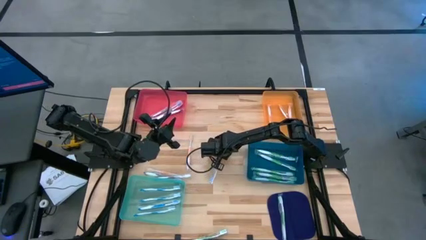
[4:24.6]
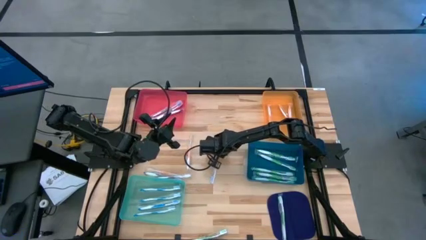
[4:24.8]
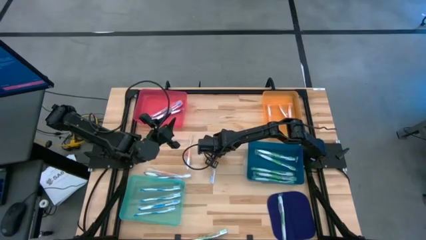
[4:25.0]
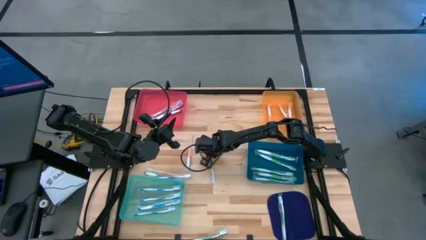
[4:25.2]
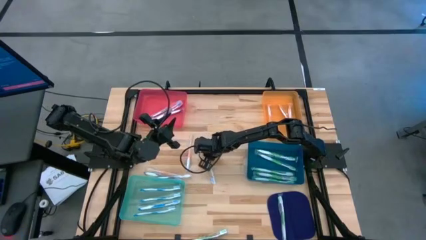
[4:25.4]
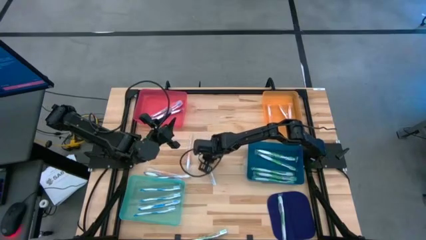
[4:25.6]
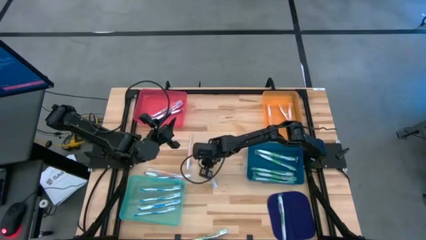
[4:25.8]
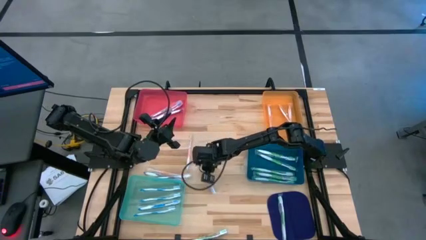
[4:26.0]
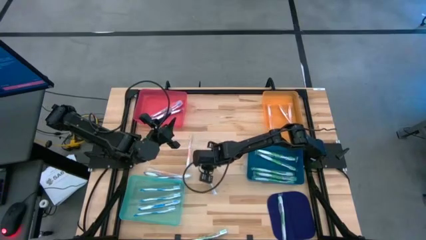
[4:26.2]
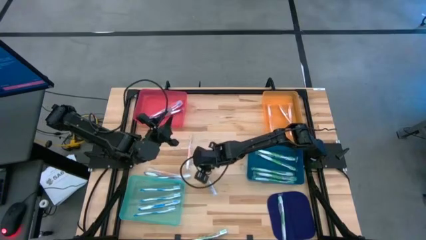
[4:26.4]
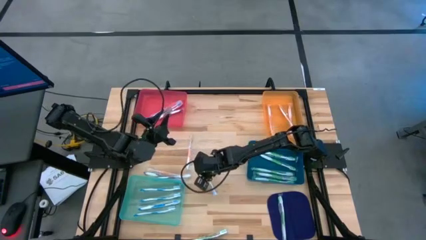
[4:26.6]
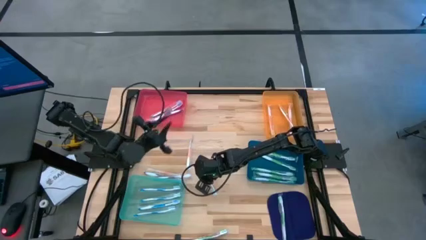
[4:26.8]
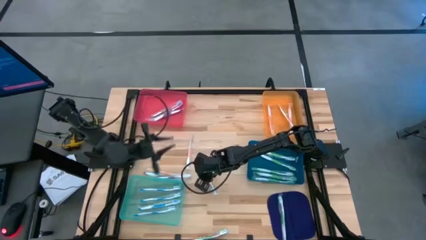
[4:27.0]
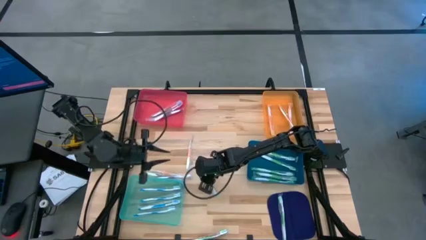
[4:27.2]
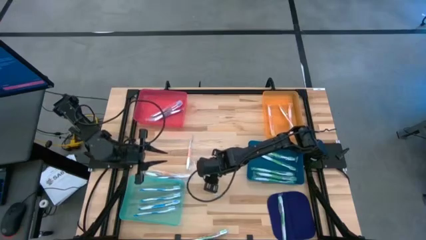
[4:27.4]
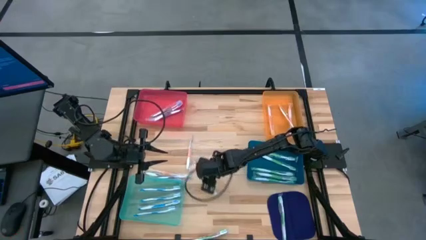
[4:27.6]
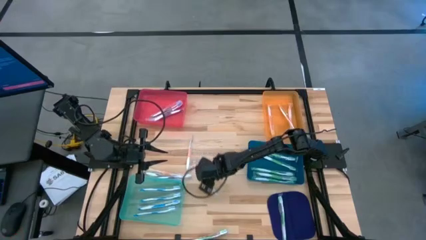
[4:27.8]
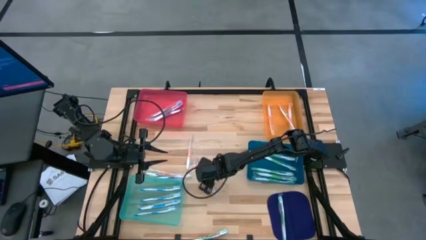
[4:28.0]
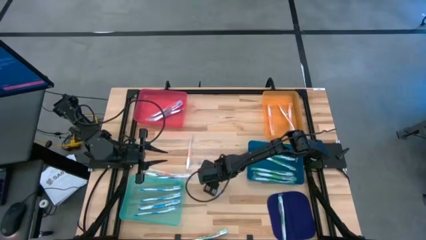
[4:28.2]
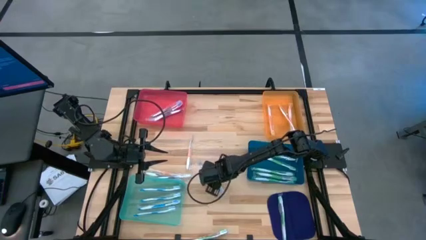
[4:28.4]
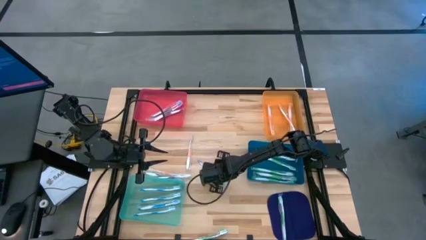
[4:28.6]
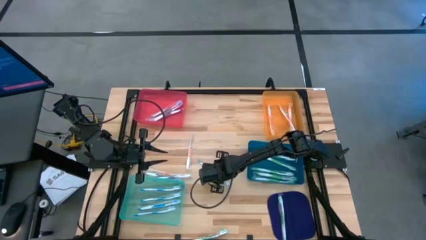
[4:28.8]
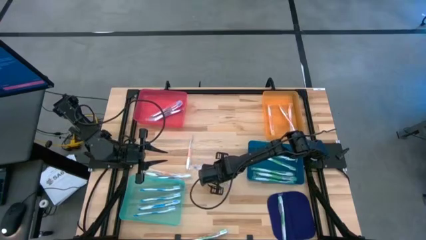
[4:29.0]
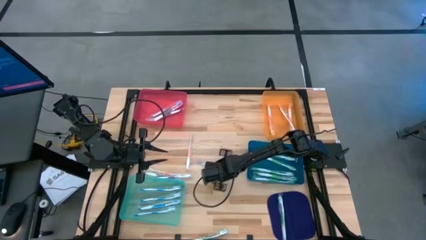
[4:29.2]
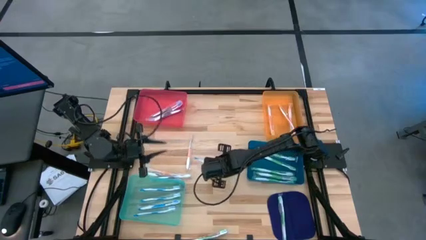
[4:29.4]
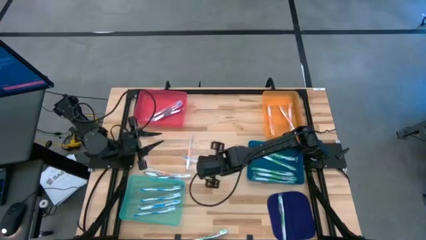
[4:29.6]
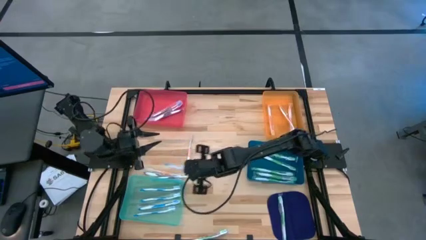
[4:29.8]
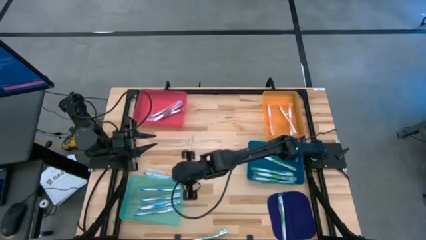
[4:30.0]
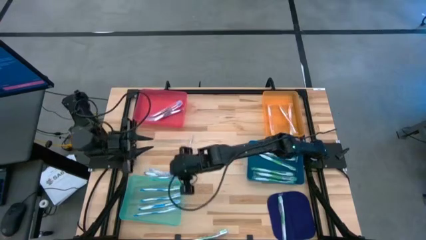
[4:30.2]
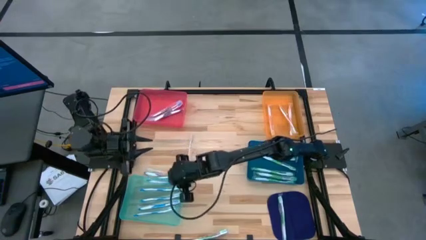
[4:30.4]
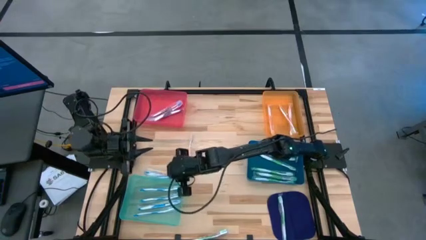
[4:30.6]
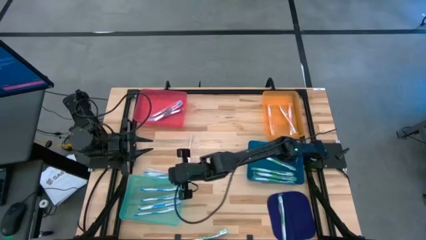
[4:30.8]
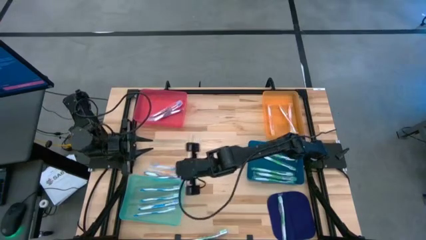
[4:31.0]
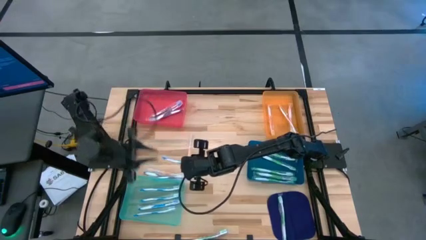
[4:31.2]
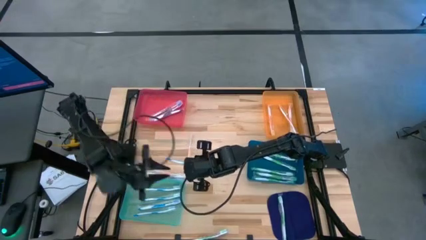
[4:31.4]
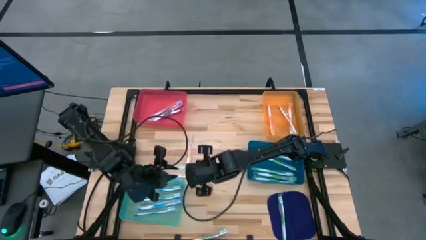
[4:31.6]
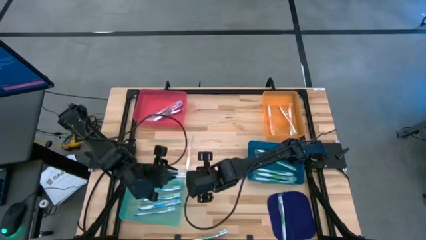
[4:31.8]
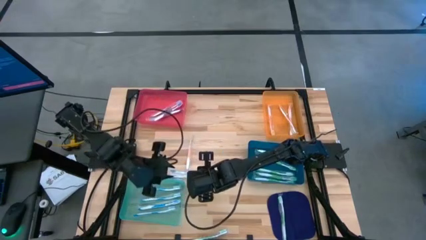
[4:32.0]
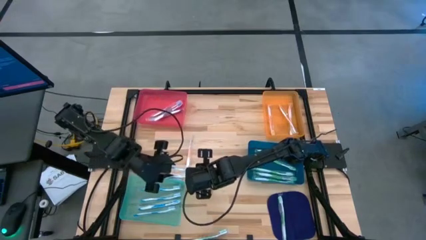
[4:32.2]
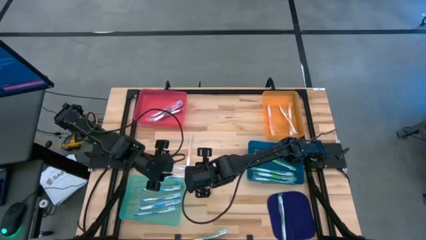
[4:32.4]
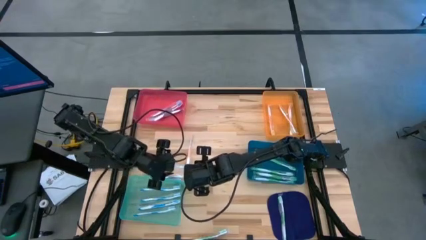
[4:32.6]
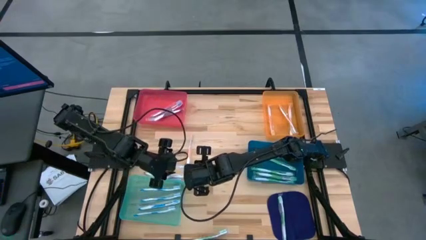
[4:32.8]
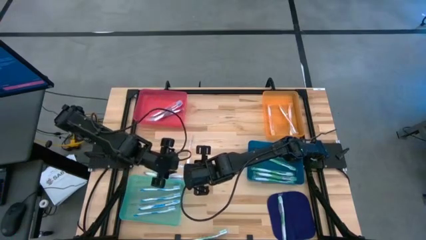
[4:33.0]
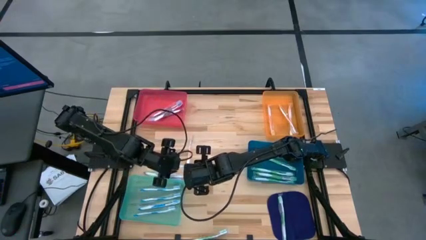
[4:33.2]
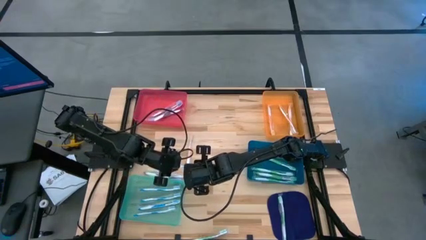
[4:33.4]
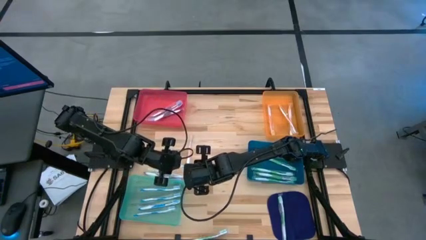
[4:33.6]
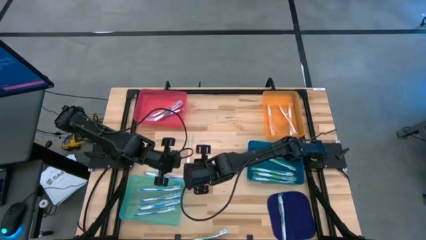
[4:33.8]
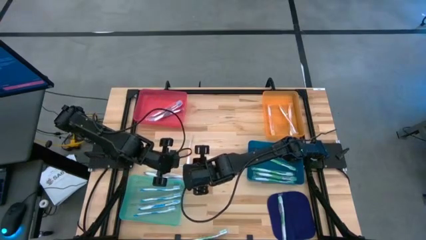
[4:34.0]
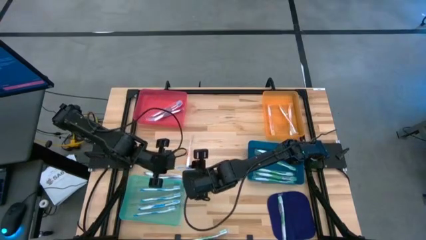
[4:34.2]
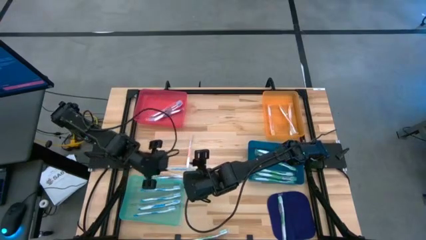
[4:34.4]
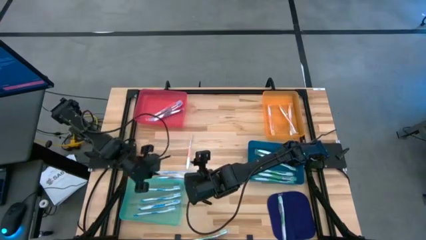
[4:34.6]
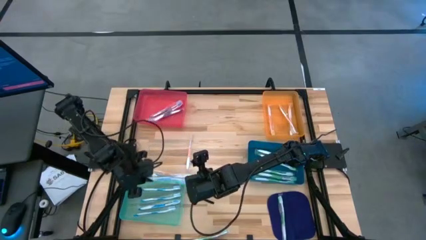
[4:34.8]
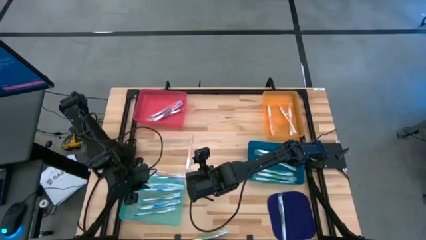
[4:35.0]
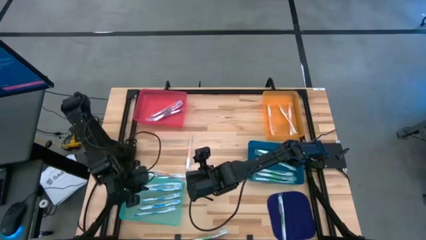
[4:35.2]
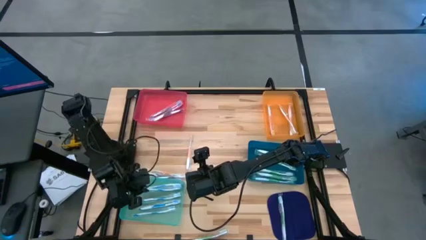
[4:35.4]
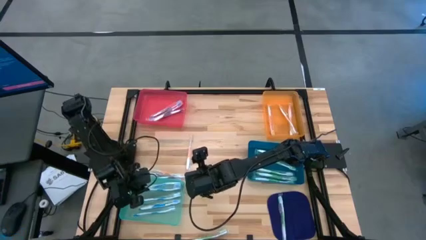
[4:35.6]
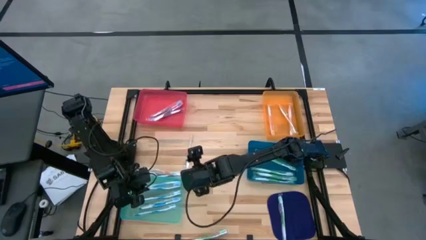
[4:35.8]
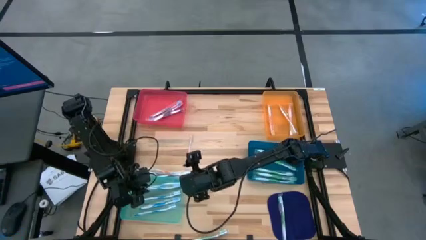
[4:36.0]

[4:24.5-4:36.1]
Task: Pick & Place Toothbrushes
Put the blue toothbrush into the green bin

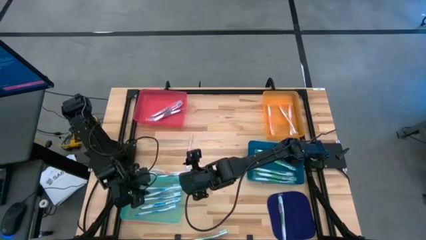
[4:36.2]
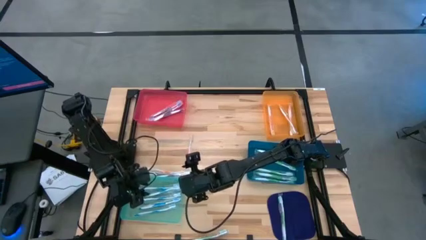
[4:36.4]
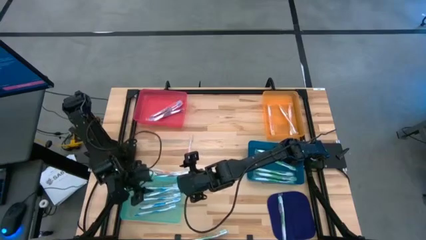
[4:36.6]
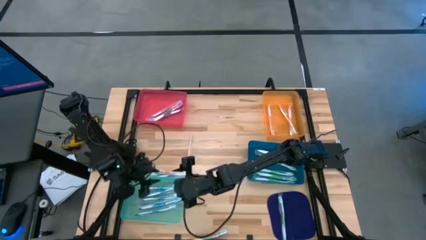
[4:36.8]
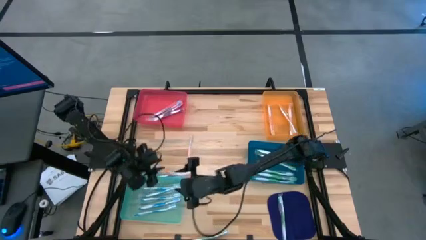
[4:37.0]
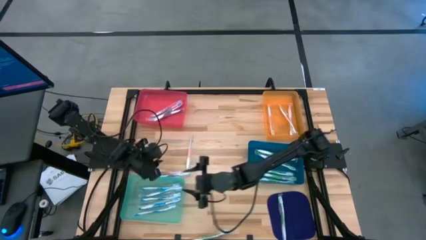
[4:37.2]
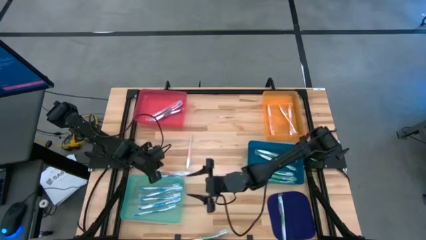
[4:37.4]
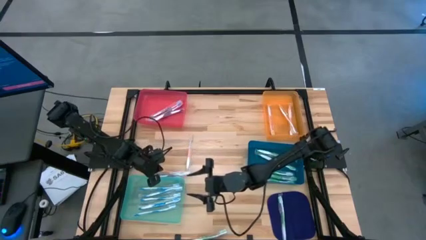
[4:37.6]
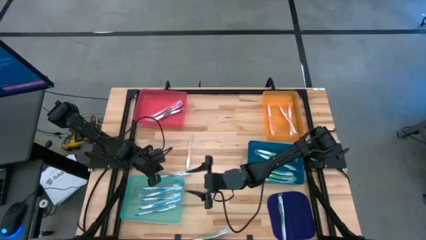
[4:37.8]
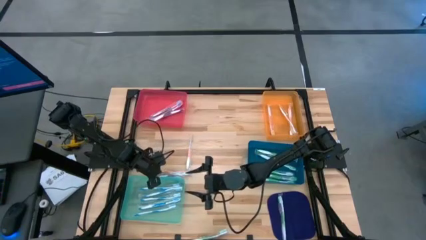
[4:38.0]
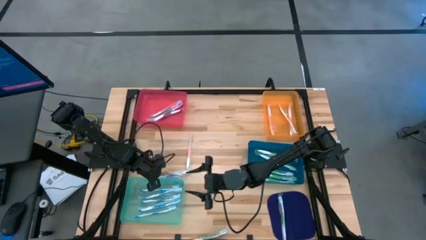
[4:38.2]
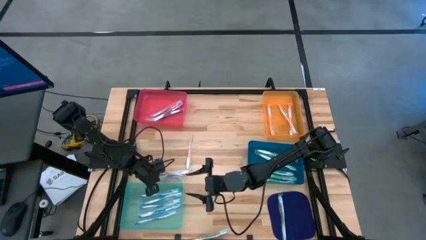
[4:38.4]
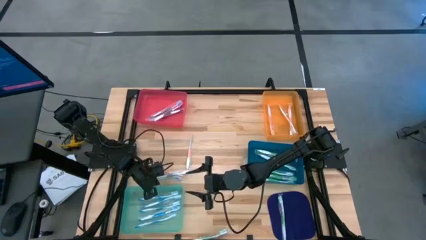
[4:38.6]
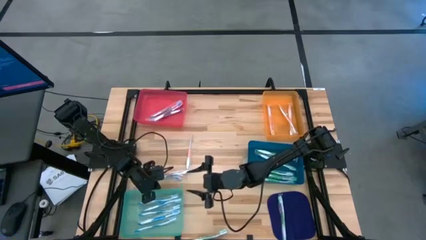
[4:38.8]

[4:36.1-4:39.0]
Adjust the green bin
